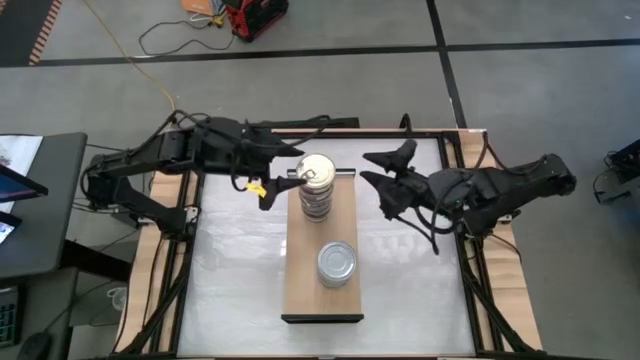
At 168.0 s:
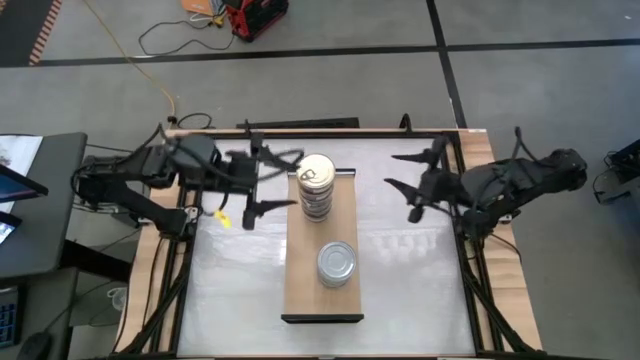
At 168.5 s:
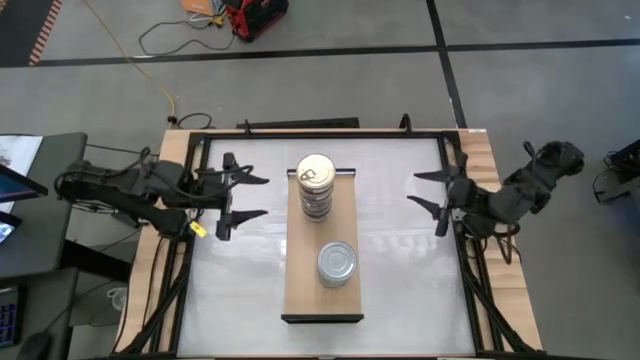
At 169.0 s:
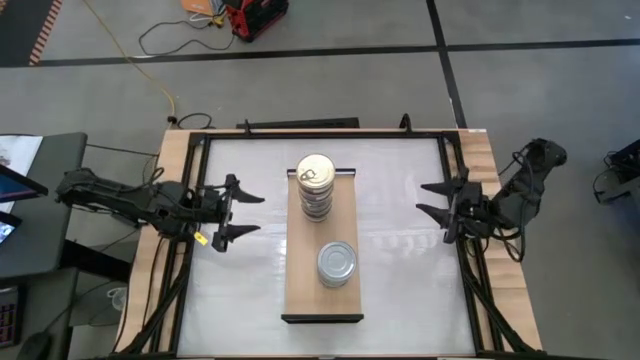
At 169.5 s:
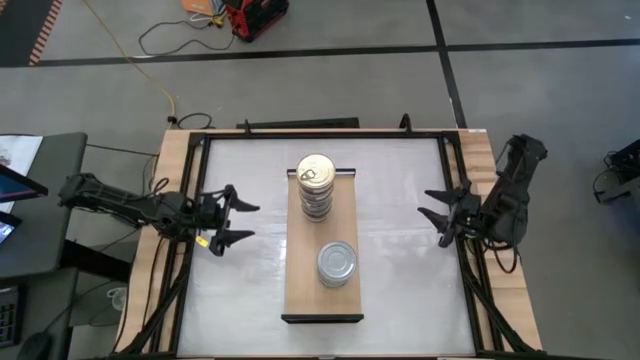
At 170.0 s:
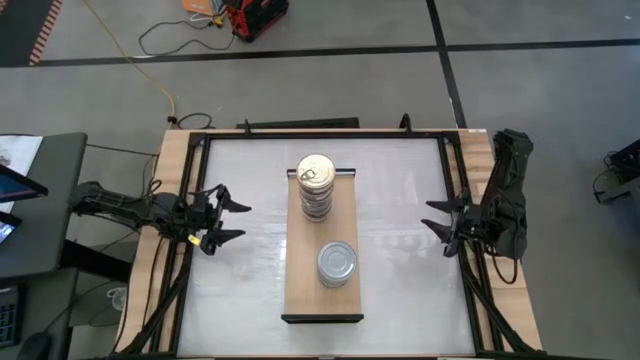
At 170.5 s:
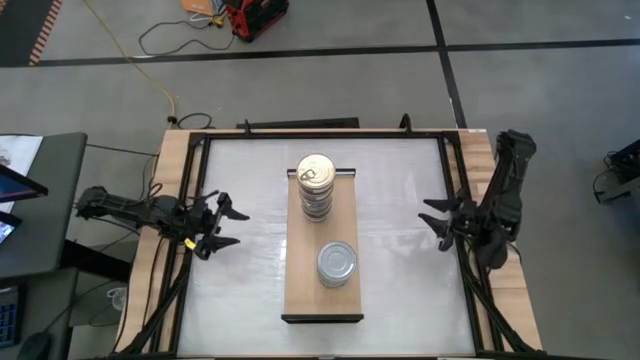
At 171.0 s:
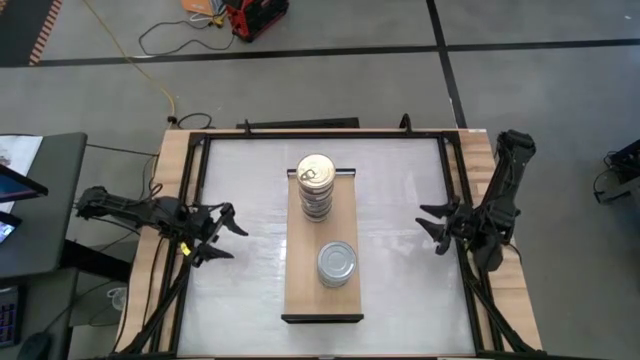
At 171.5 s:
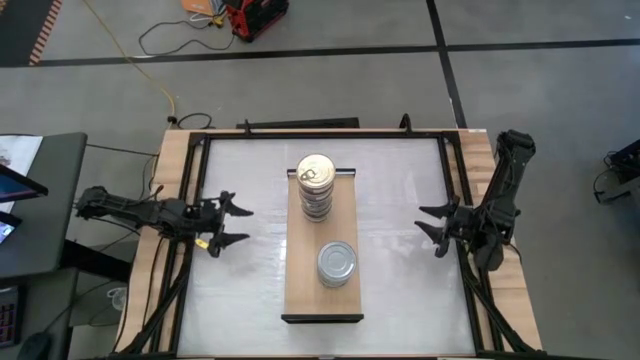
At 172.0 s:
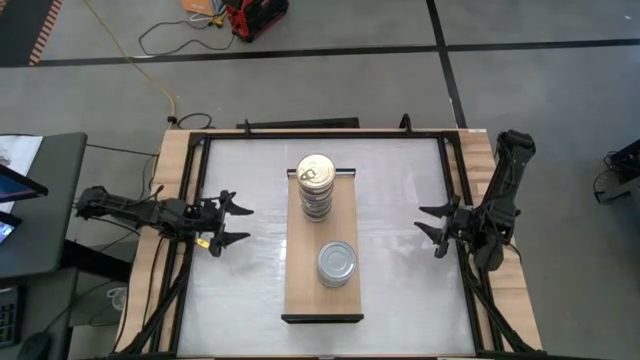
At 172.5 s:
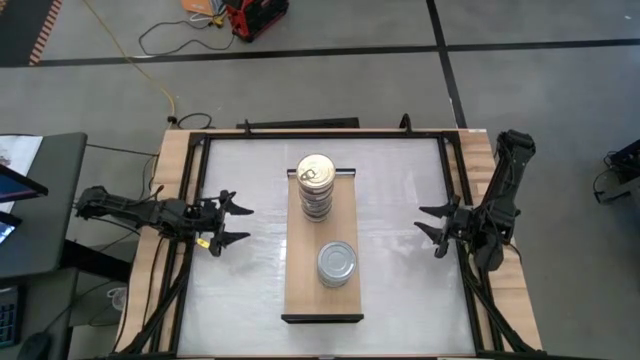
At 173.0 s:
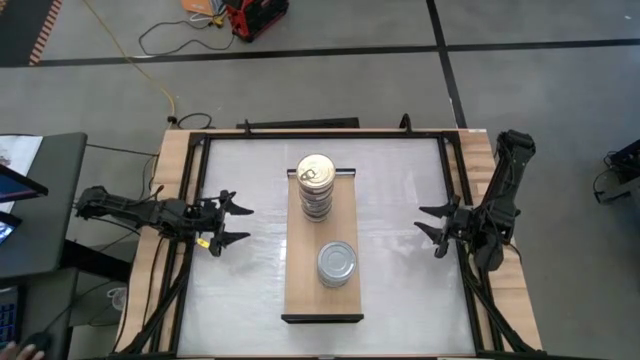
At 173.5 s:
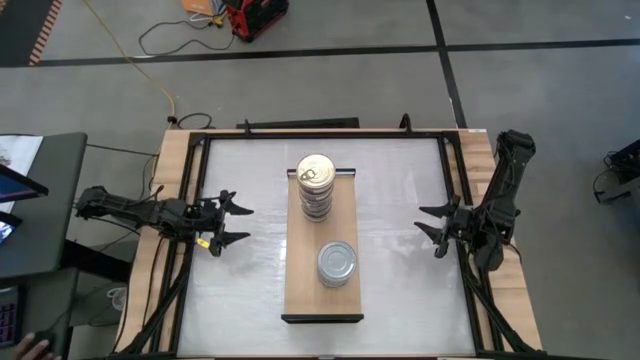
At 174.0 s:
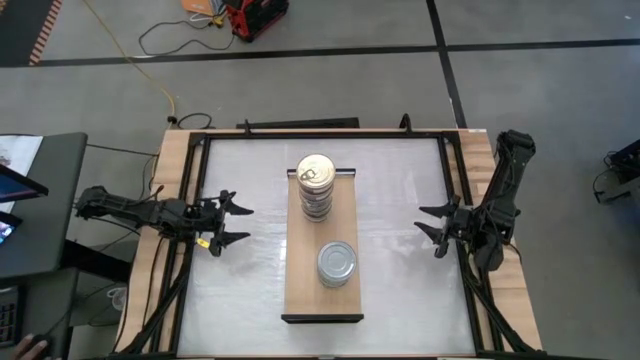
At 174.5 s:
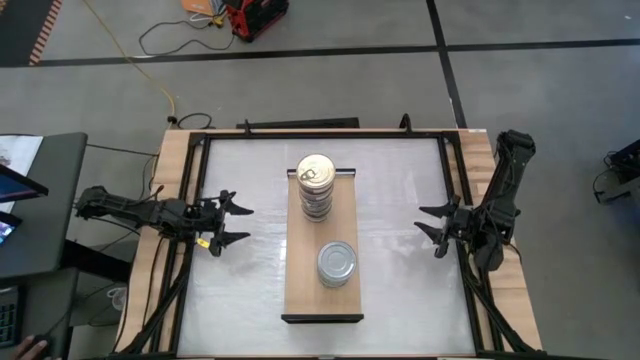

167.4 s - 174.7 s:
Task: Stack canned seafood by type on shelf
Return to Home Position

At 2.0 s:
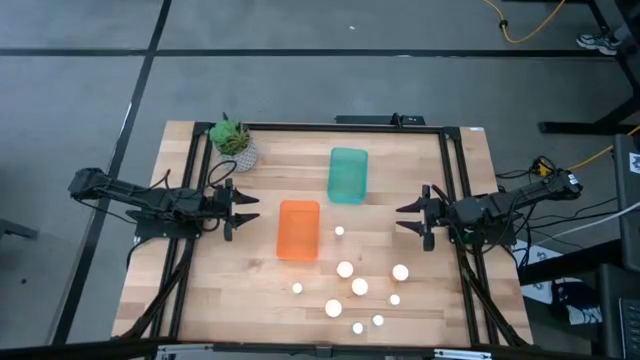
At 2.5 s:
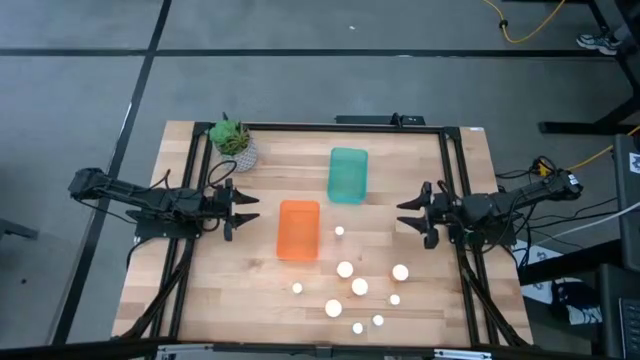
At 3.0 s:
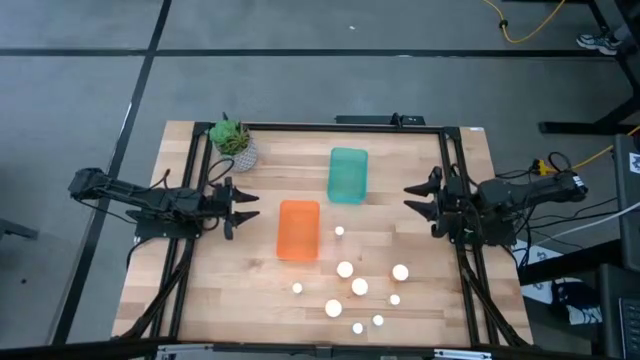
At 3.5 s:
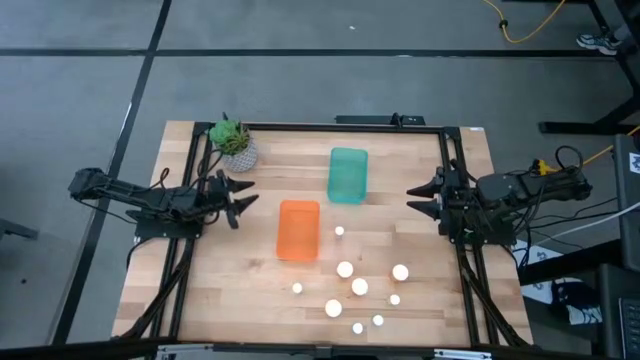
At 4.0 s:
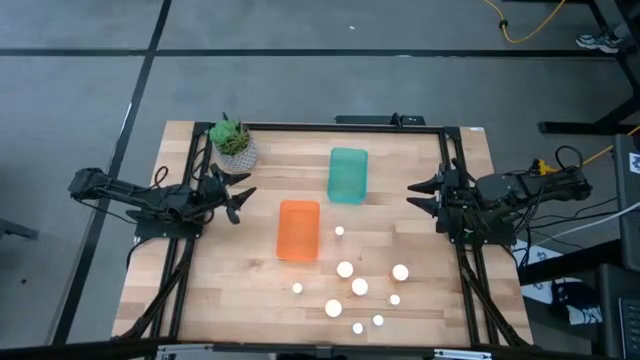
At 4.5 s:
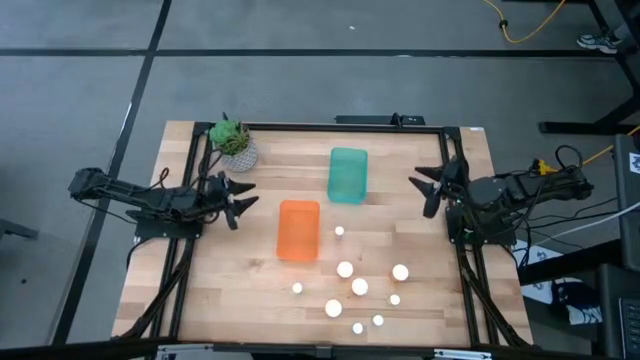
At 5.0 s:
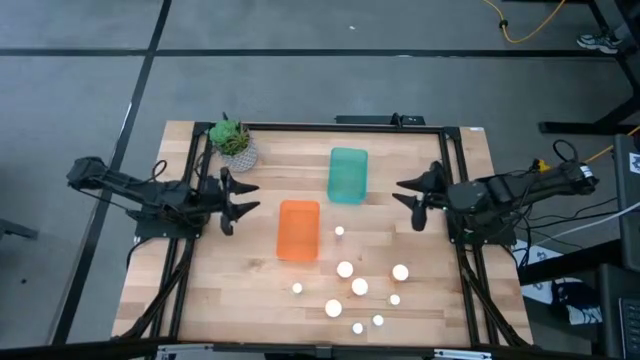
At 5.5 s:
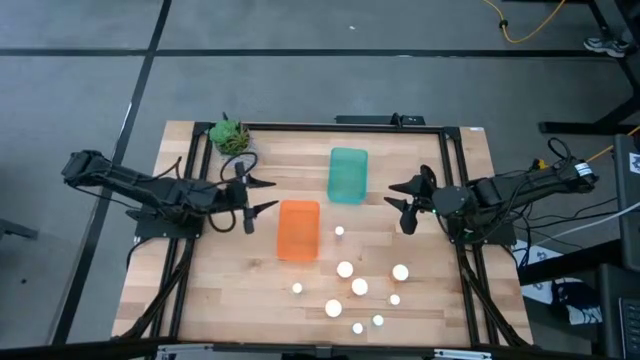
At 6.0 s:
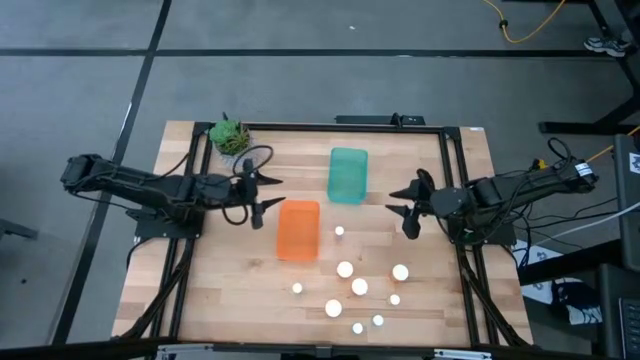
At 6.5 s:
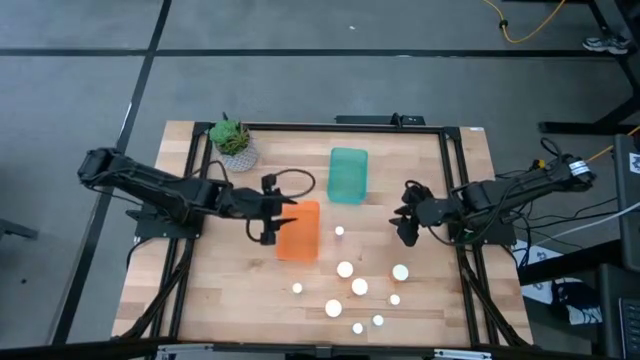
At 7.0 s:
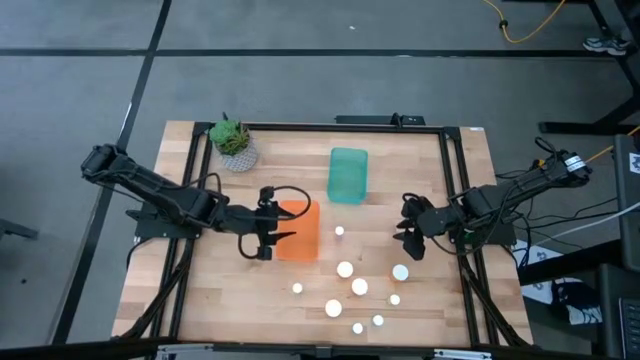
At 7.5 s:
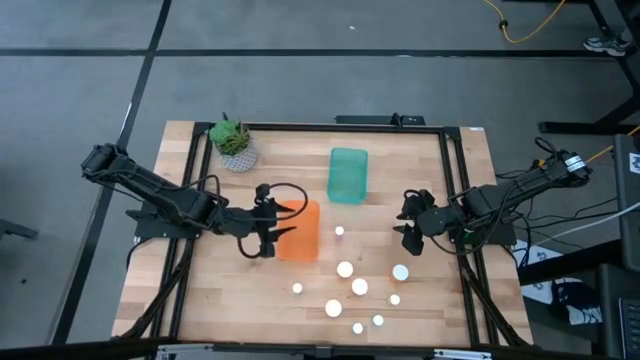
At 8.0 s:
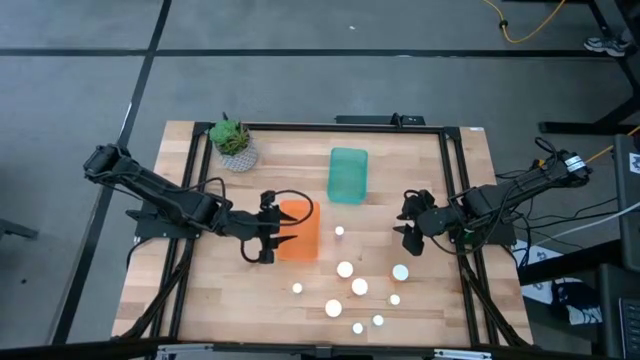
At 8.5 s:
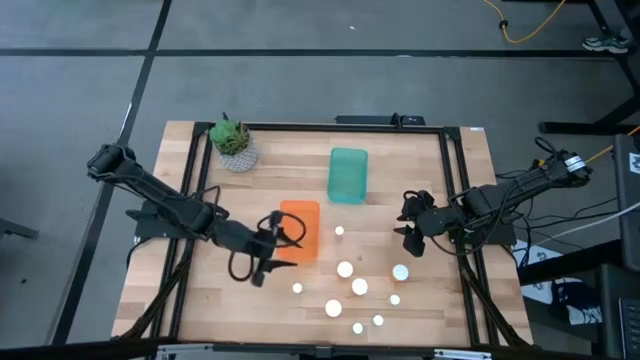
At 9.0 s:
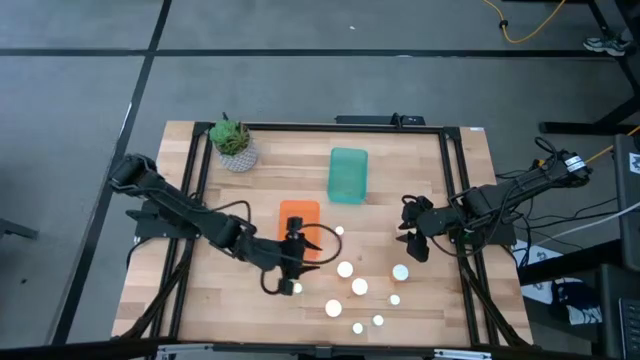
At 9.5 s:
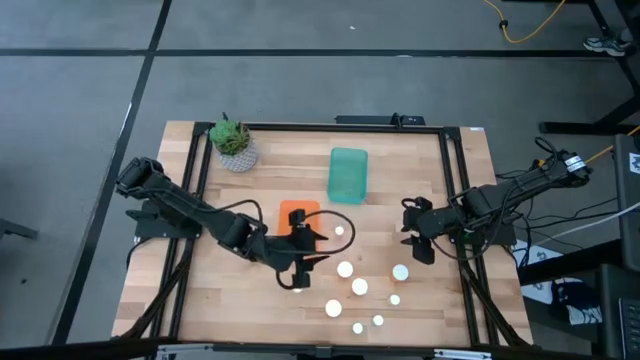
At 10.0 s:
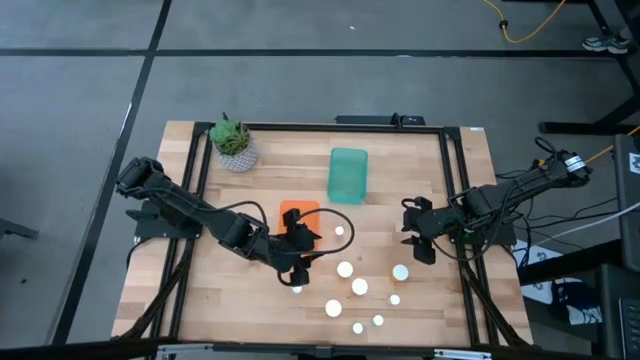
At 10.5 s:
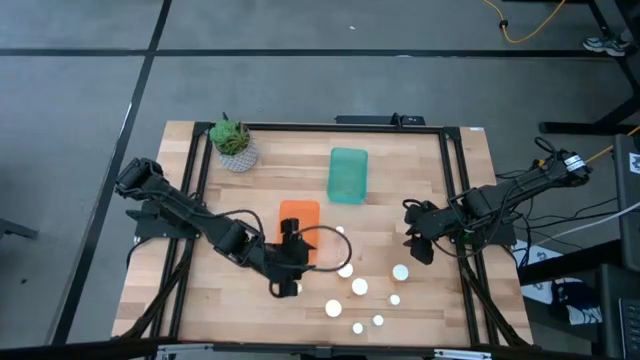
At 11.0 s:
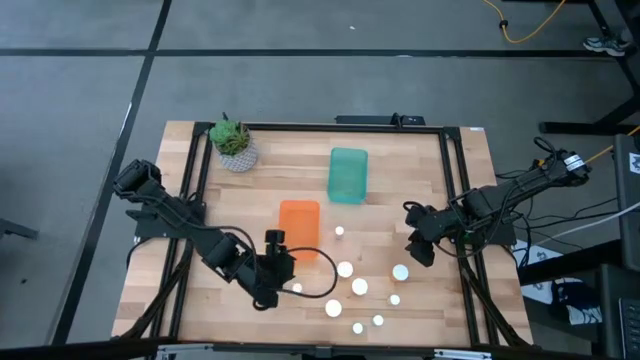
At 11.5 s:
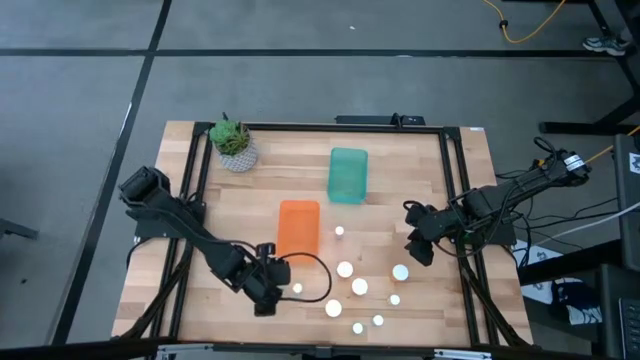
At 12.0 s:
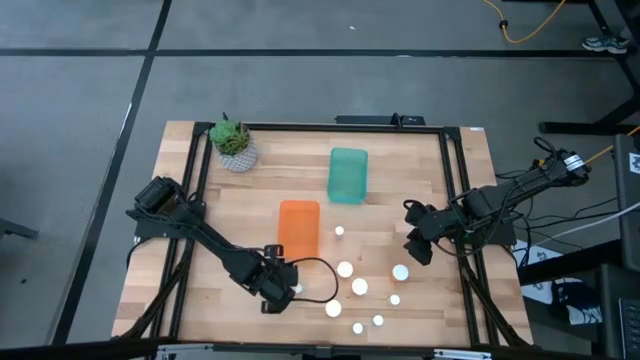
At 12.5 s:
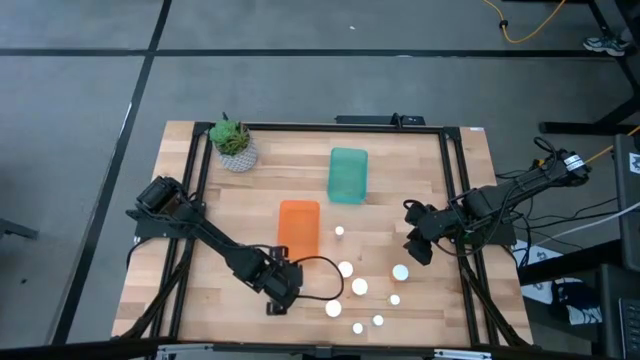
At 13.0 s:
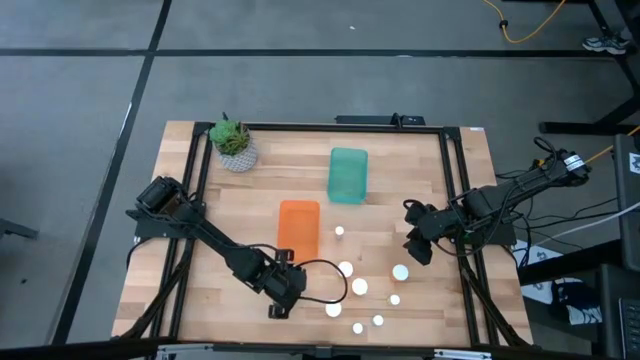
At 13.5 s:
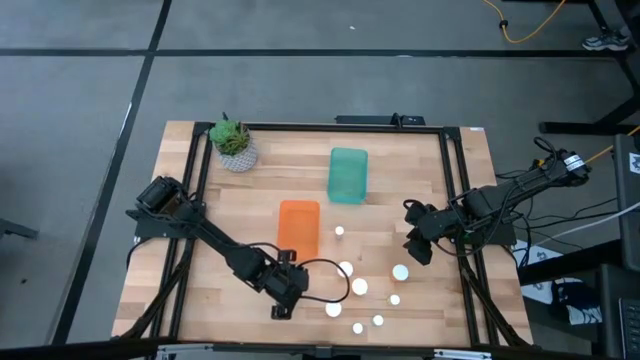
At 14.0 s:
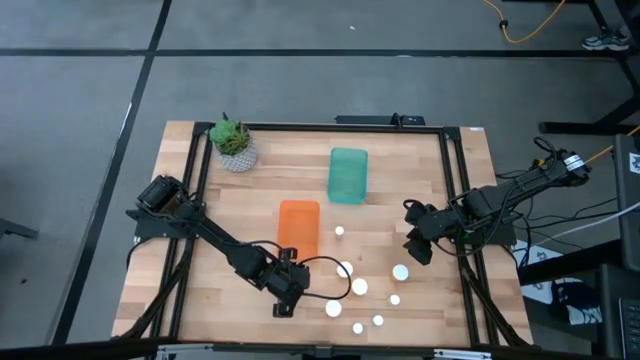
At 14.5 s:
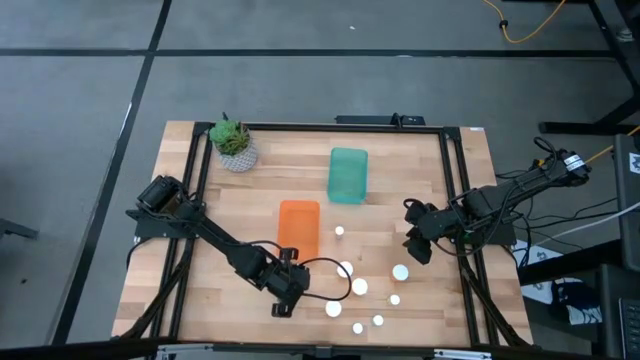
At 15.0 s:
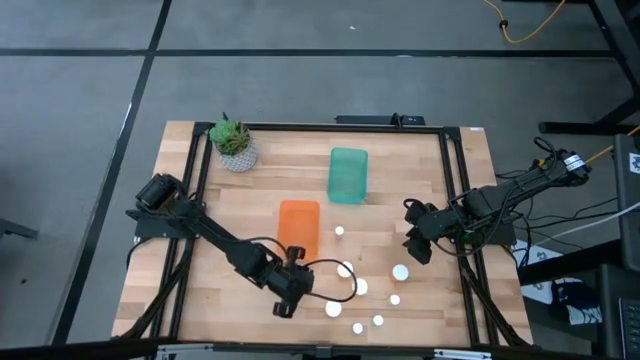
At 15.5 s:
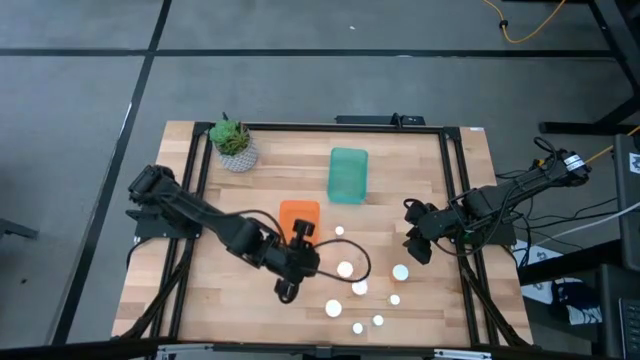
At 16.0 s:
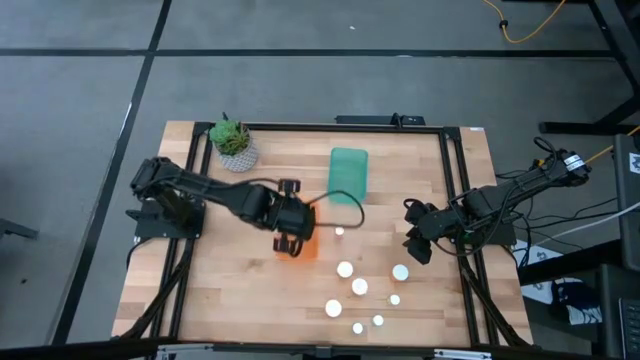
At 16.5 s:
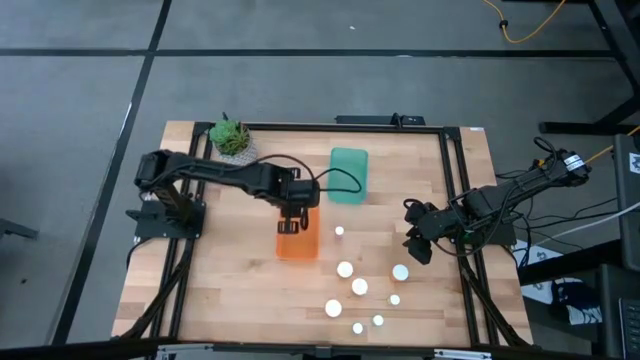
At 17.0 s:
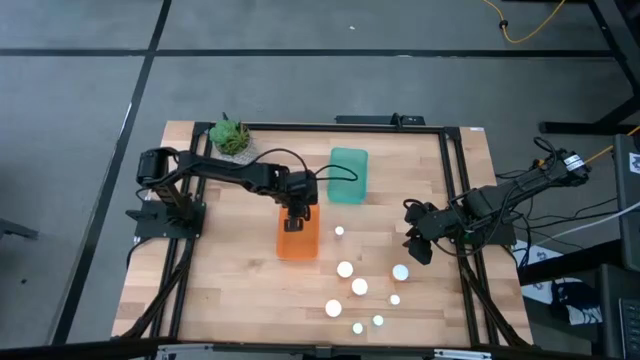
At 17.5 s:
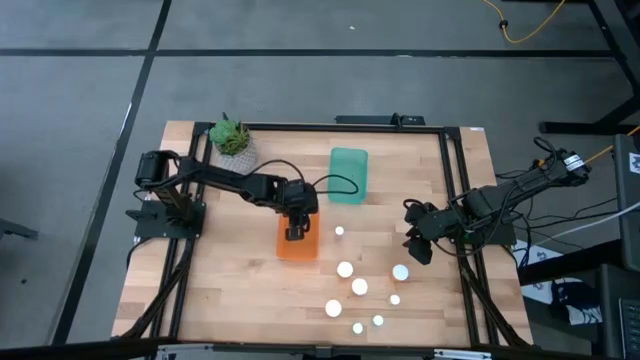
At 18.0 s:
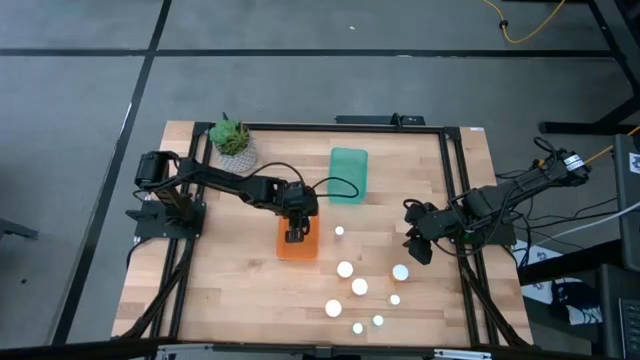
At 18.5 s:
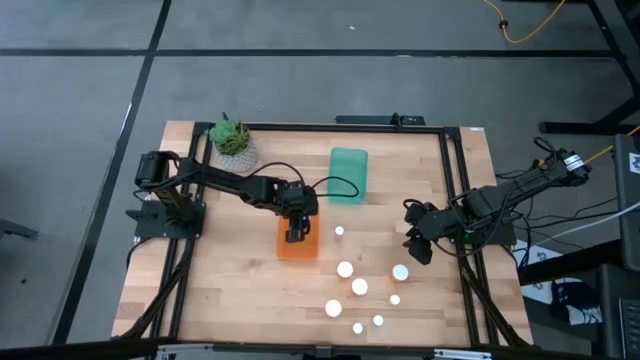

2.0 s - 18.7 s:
Task: Pick and place medicine bottles into bin by pill shape (circle, oval)
Put the small yellow pill bottle into the orange bin
